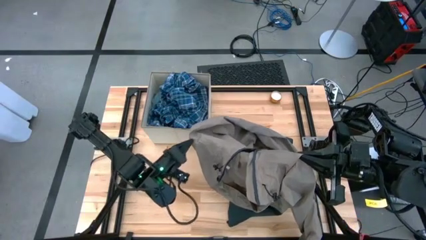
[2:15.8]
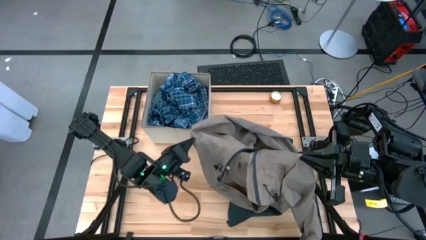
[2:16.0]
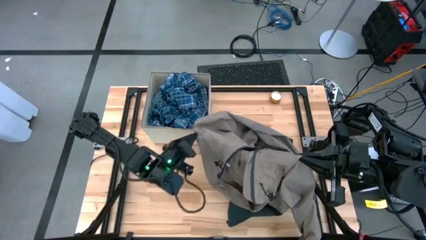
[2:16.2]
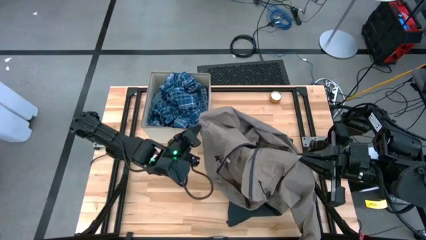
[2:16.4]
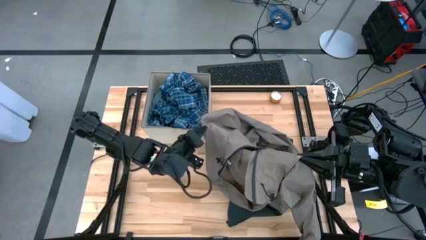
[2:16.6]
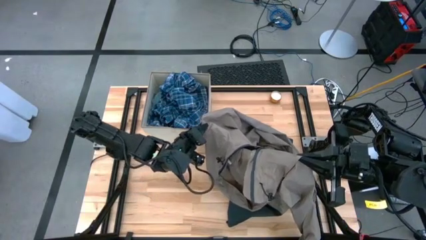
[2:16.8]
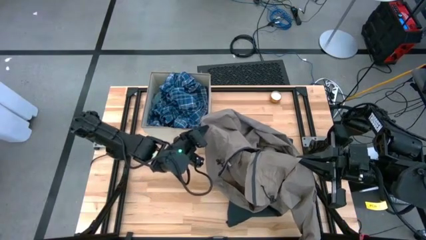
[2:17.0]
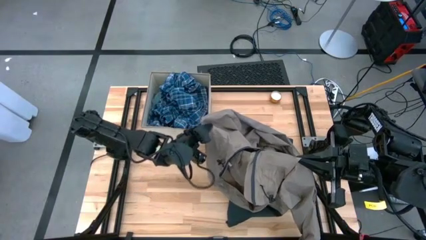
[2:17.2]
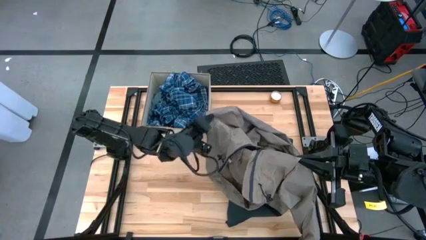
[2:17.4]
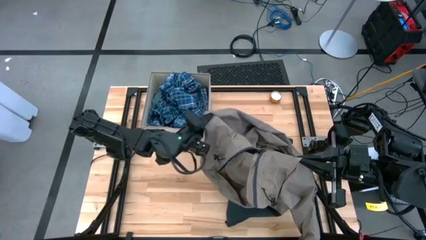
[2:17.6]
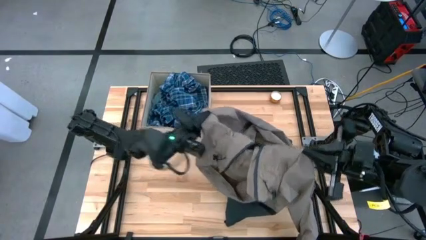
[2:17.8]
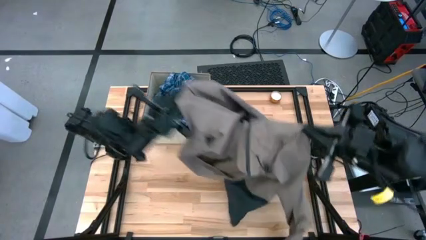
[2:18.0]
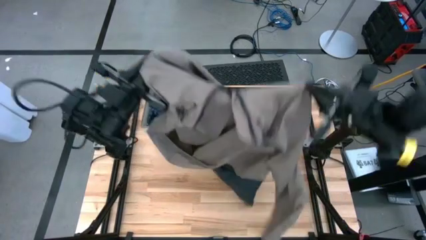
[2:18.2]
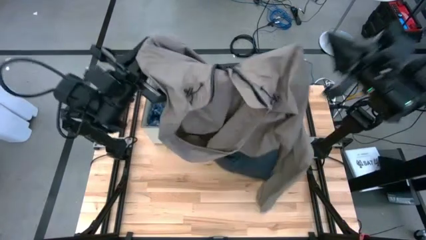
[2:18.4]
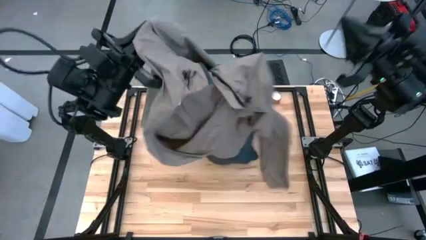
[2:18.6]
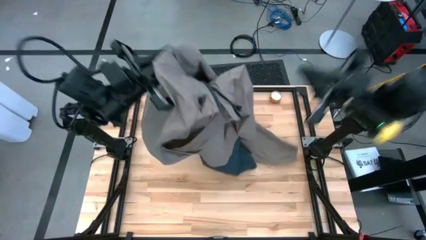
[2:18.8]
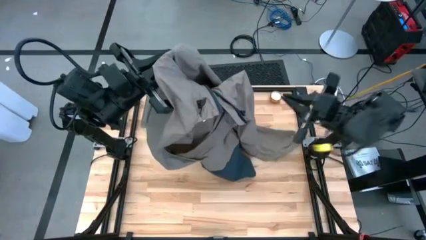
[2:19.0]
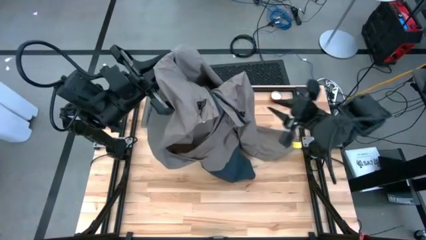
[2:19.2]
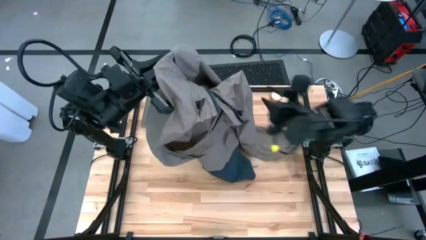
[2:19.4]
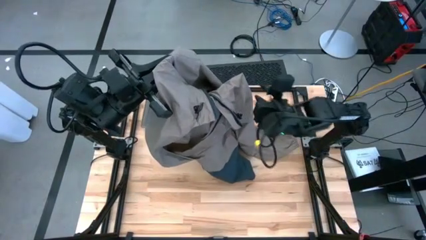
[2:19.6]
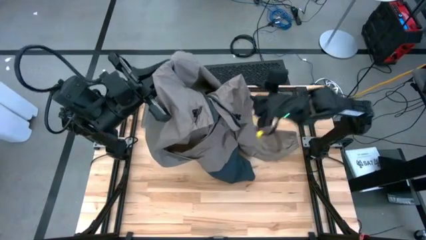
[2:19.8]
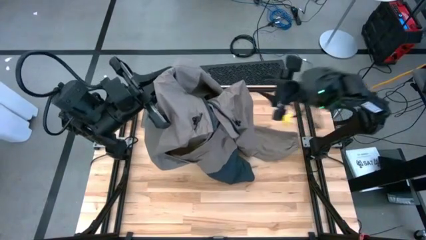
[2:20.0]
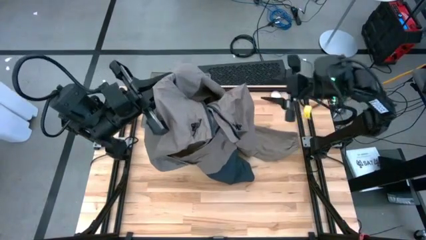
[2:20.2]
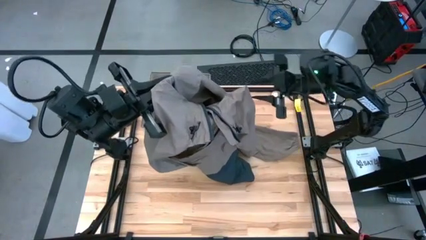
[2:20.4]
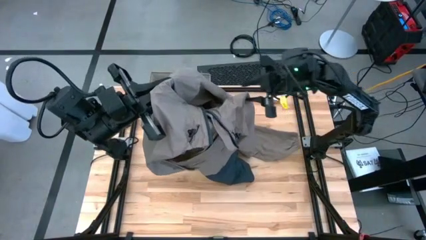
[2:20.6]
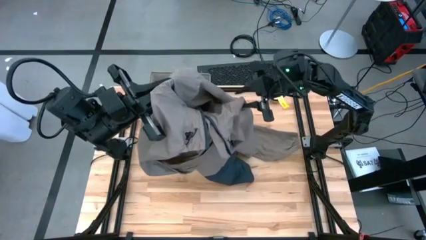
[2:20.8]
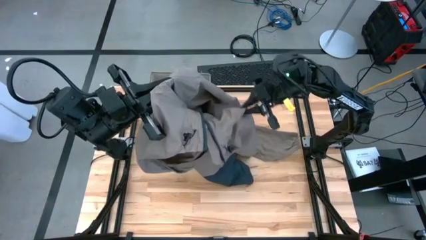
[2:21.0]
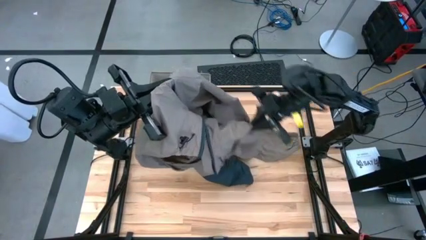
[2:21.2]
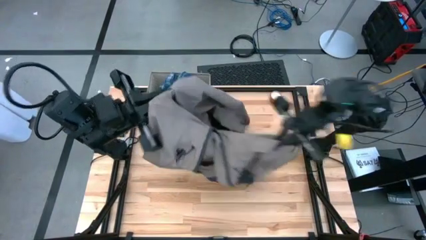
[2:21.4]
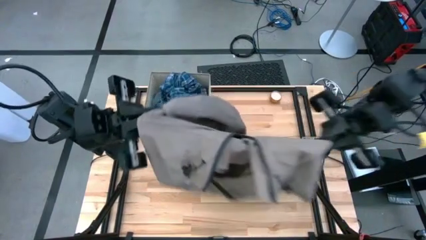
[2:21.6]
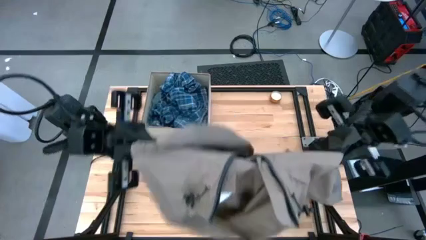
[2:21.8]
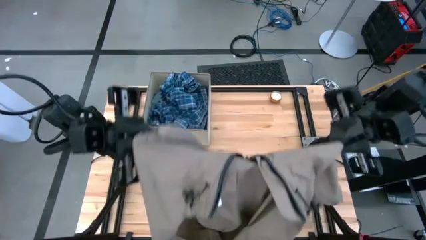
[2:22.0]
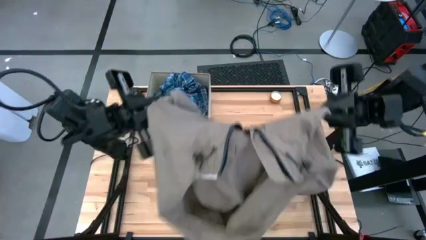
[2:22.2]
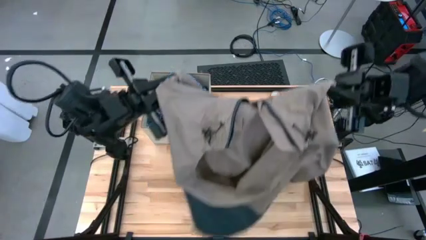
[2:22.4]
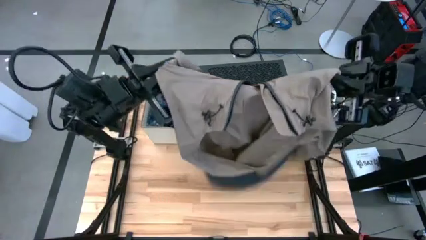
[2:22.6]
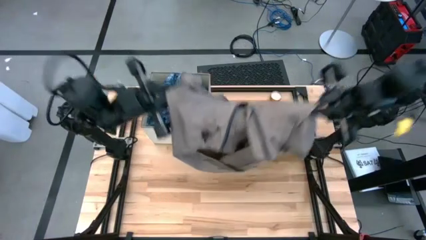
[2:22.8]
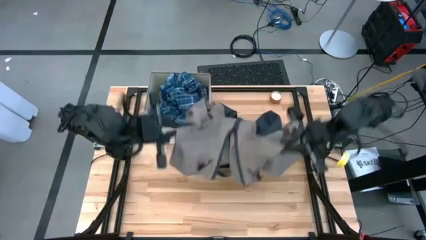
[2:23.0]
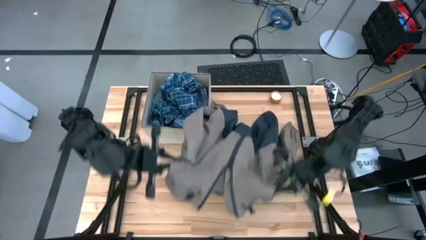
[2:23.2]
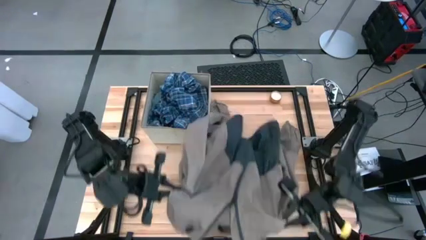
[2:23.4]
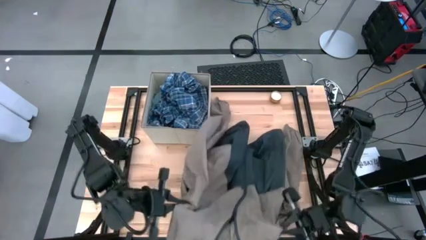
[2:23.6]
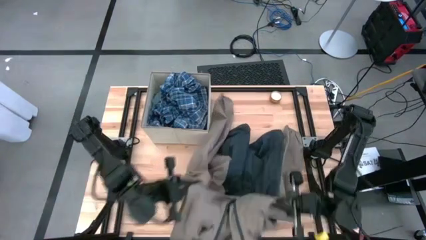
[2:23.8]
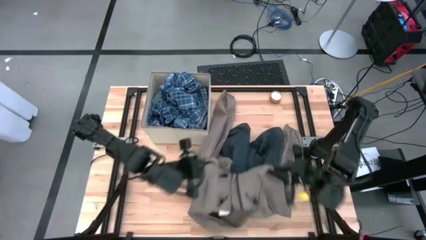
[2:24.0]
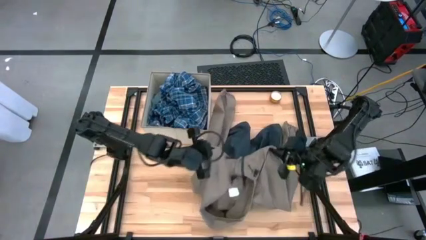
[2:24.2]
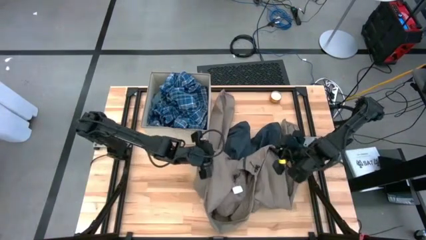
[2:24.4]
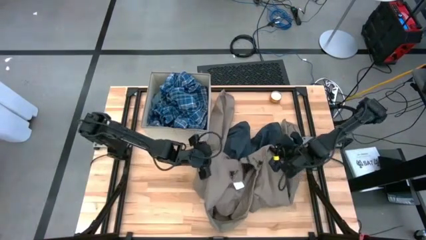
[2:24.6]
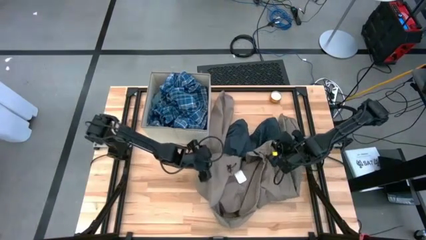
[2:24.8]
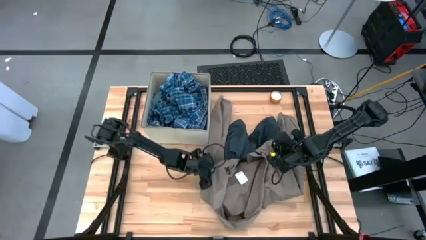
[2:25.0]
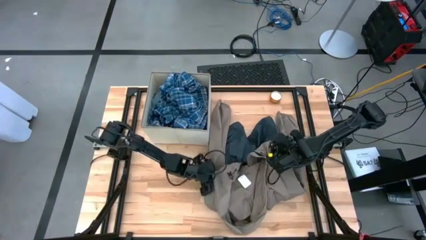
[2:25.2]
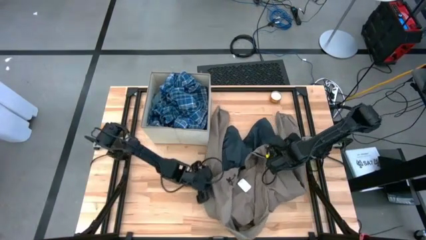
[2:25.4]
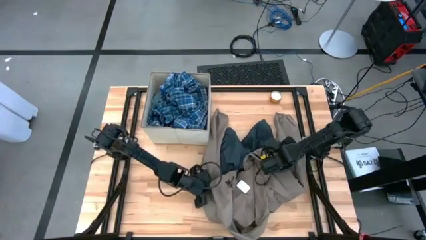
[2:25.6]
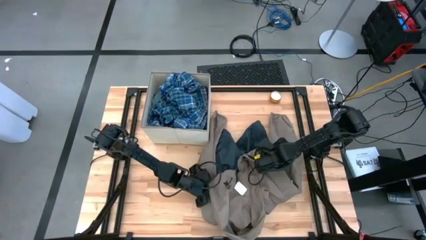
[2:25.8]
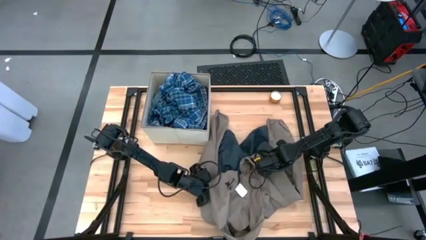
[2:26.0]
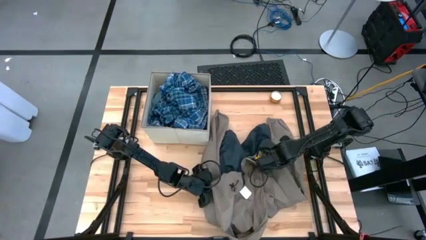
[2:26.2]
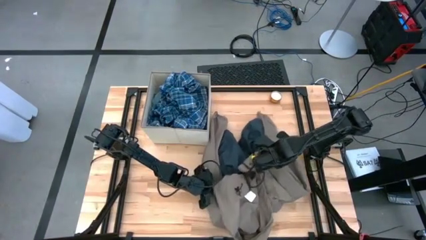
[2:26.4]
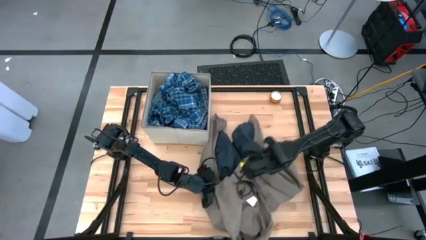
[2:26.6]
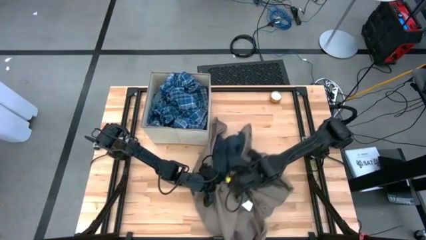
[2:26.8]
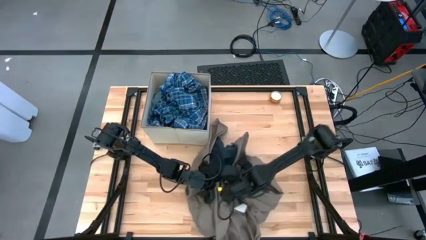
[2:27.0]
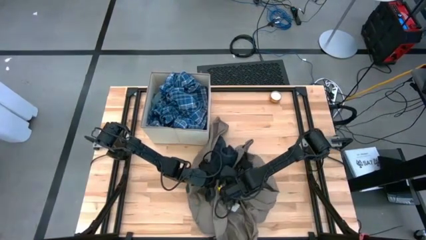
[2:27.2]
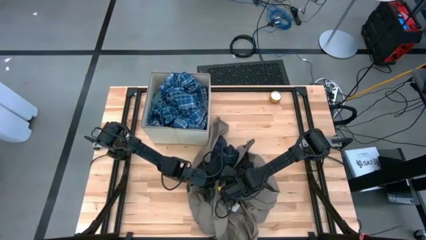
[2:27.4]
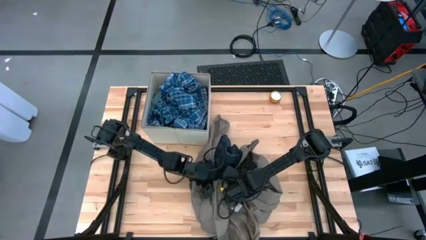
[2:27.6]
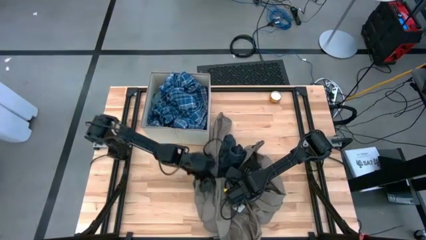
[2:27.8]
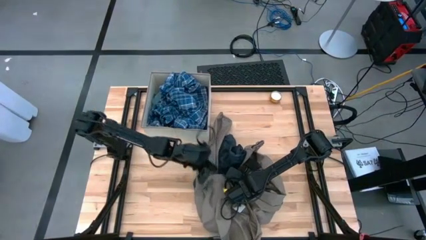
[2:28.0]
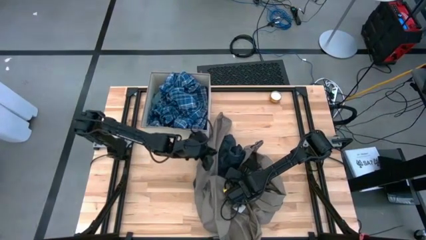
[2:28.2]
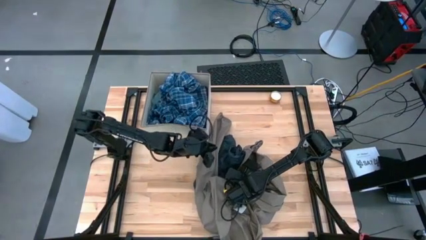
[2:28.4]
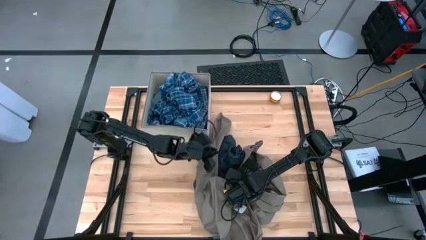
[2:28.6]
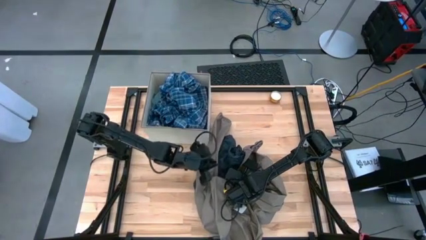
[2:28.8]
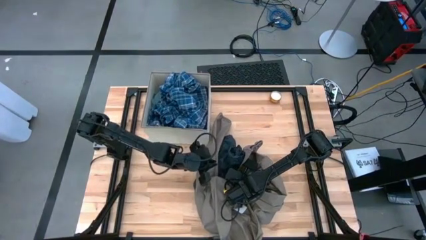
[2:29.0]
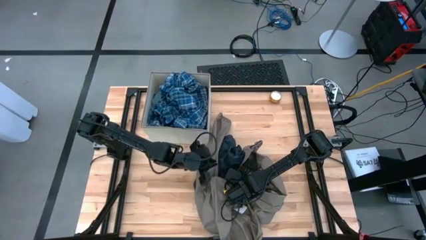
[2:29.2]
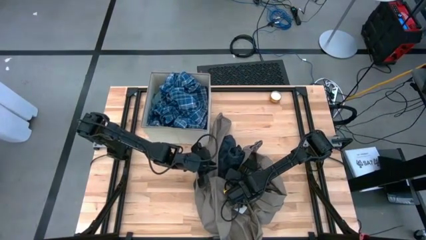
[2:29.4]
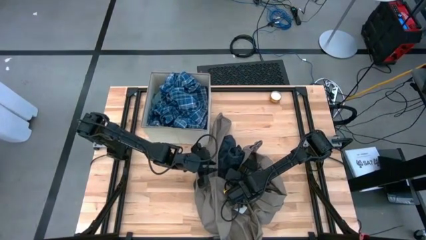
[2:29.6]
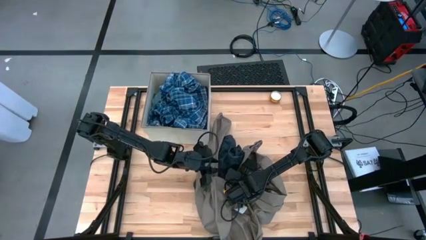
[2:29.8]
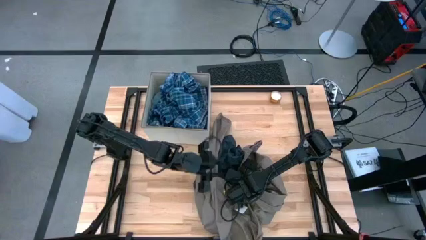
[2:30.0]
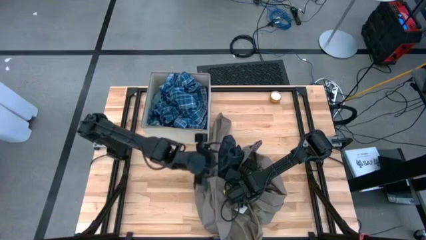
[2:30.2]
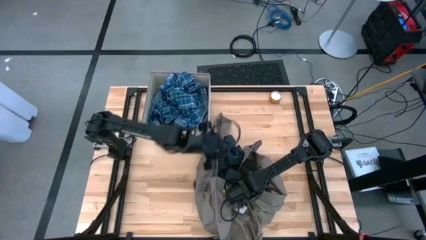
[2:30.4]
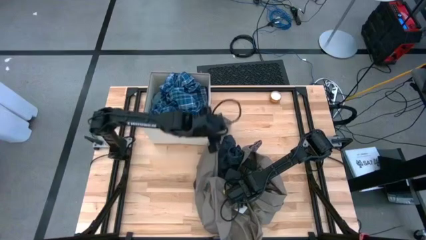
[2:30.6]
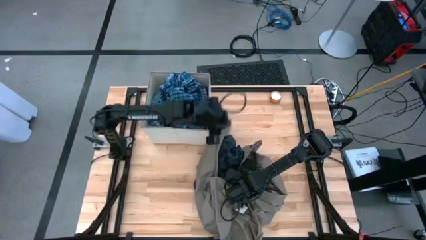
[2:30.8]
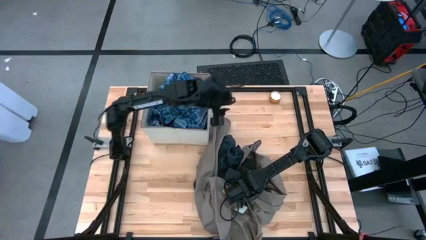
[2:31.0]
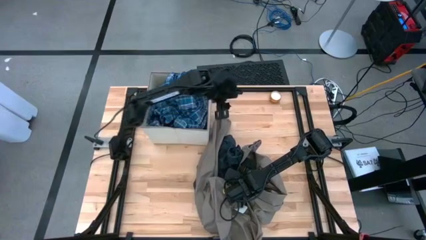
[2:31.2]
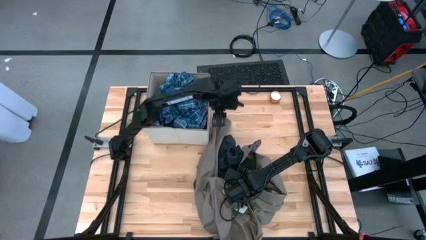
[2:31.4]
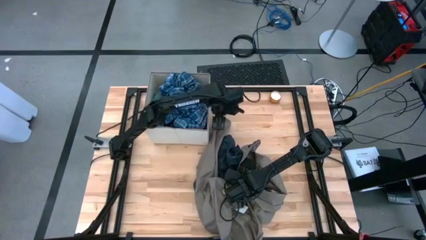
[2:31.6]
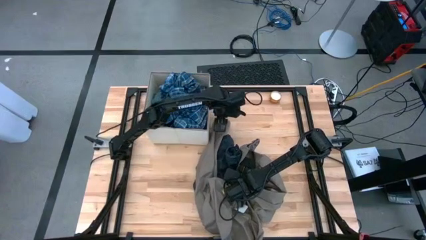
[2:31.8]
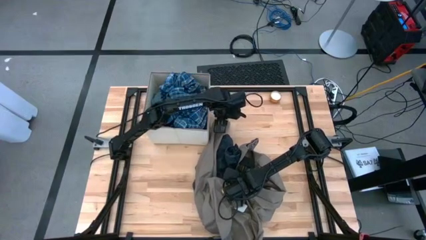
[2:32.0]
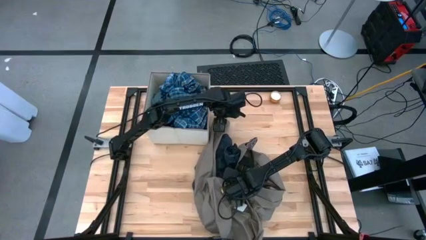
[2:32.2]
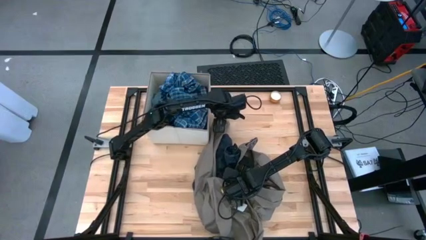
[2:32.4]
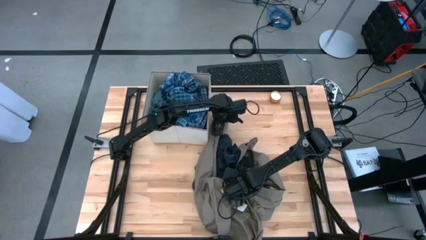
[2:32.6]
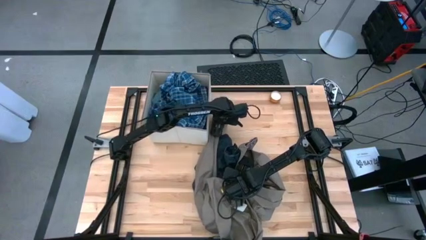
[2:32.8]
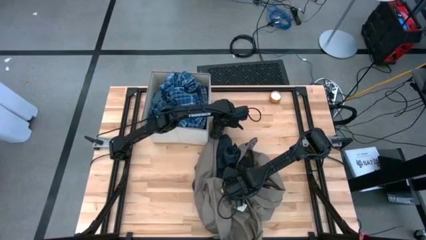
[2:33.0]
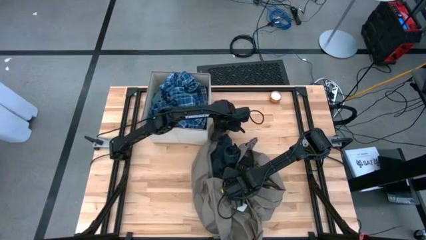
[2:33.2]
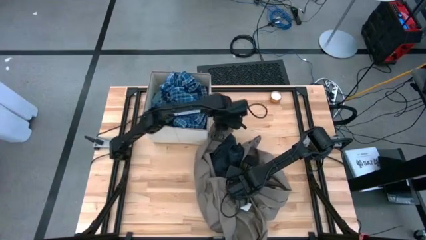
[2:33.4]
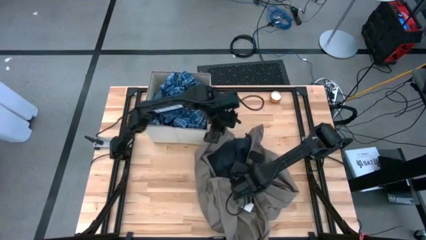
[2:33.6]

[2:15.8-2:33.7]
Task: Sort clothes
Put the brown jacket into the laundry organizer
